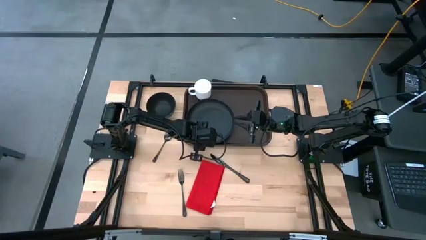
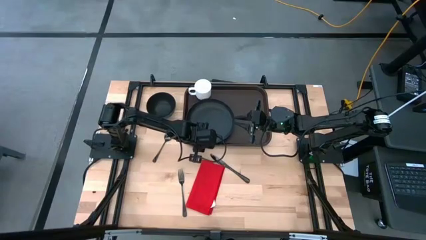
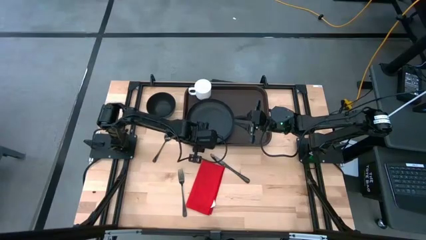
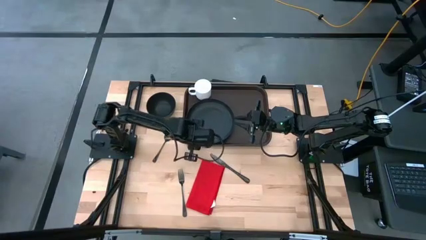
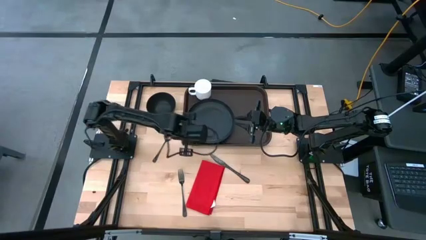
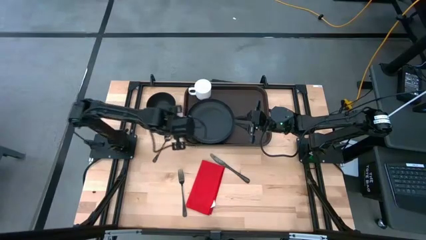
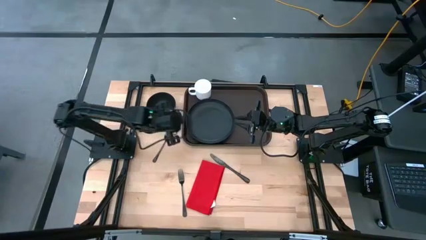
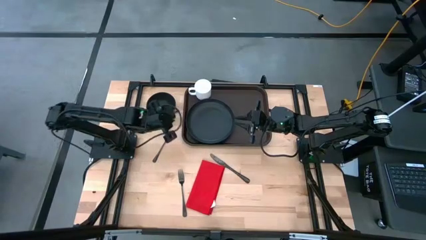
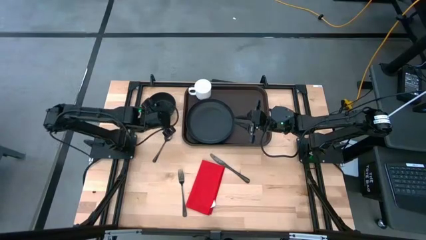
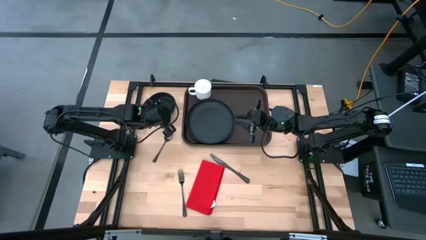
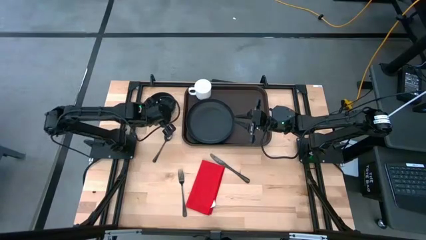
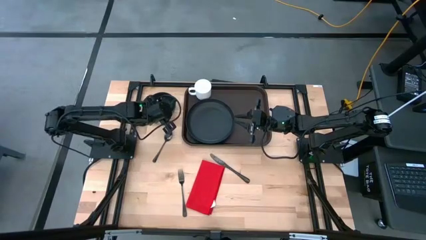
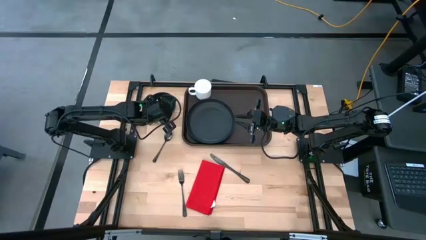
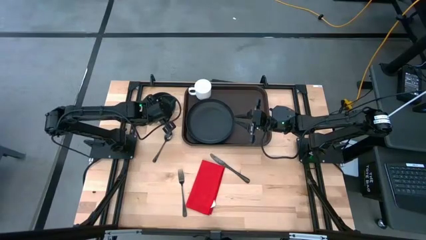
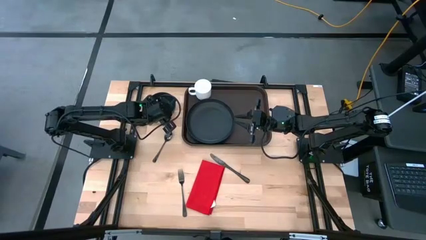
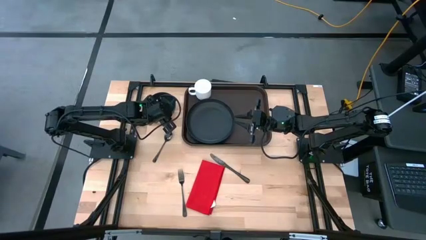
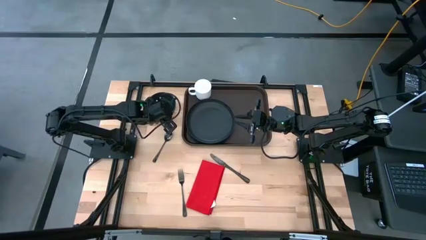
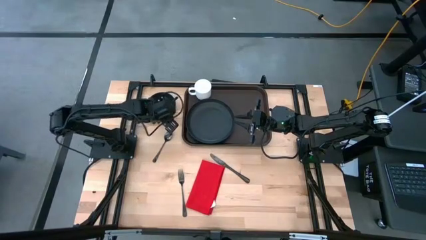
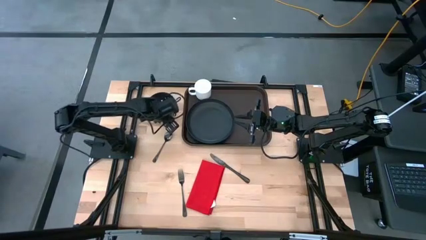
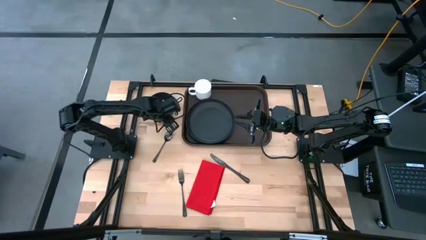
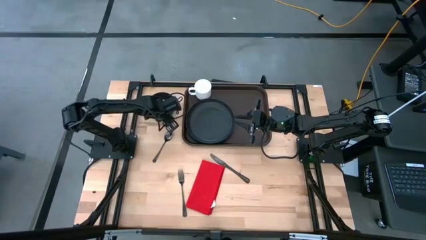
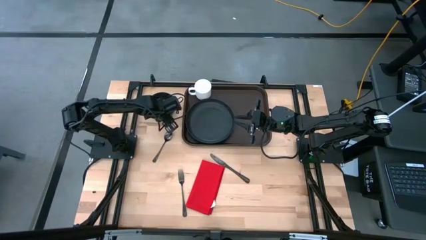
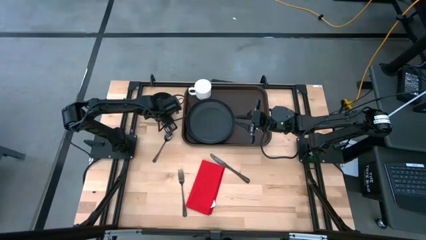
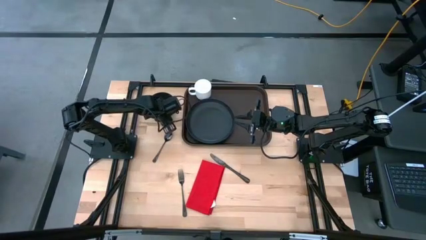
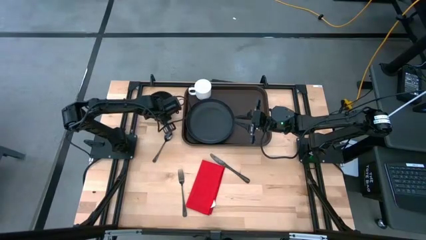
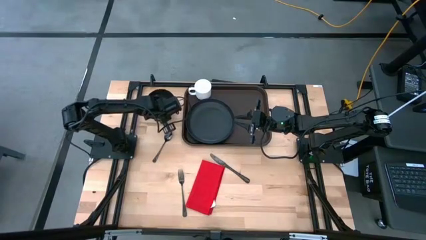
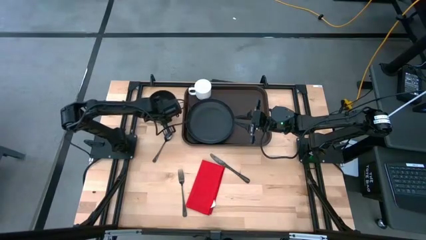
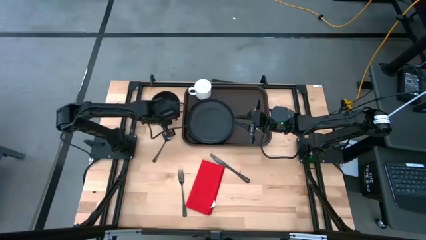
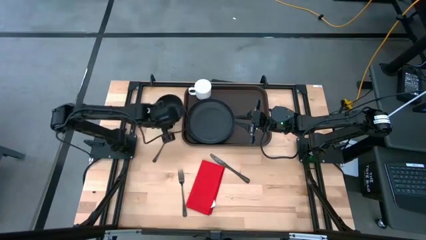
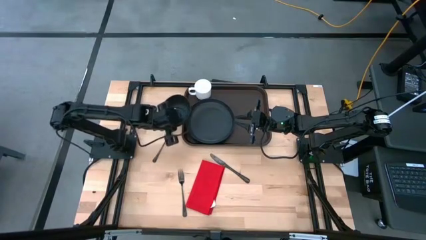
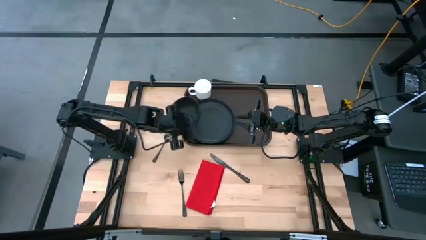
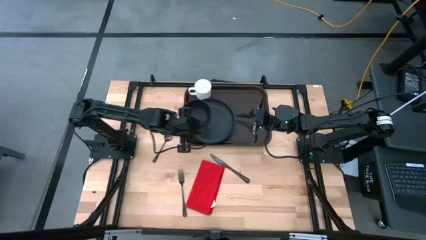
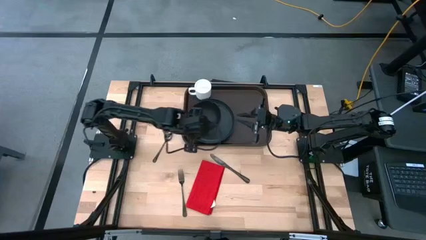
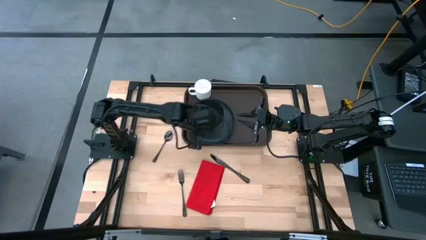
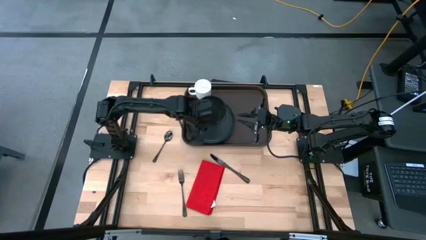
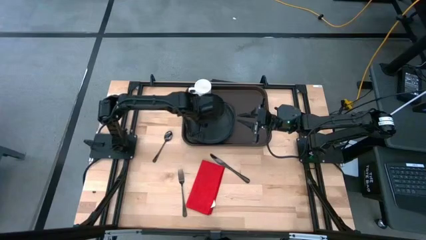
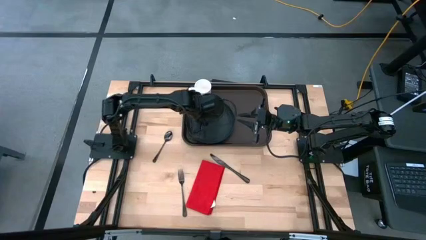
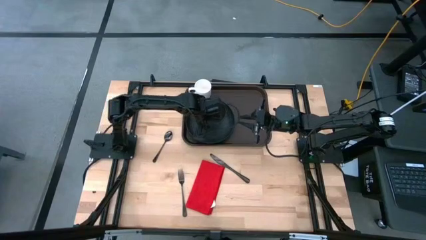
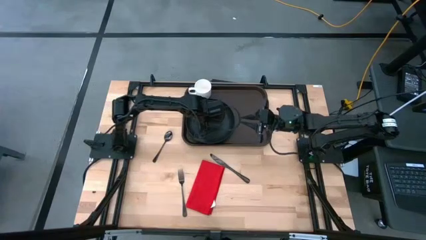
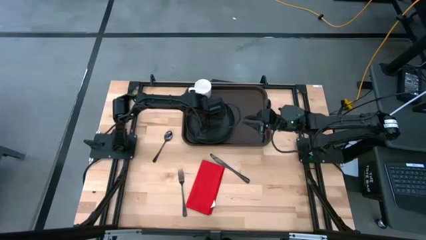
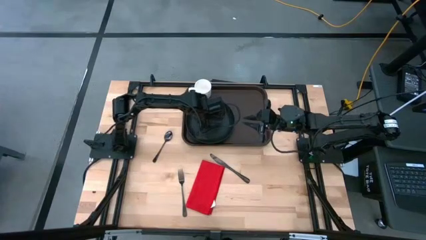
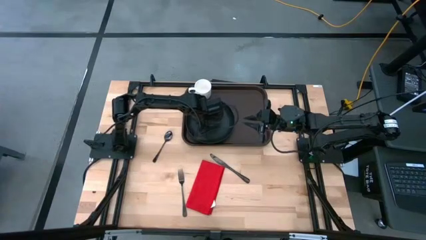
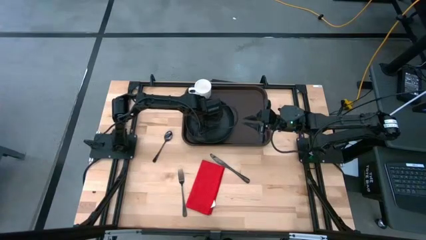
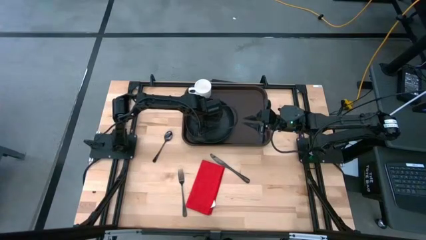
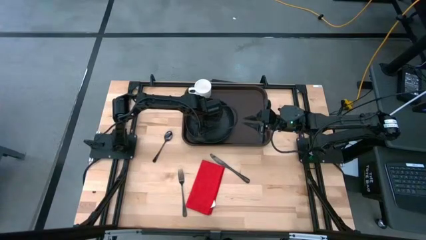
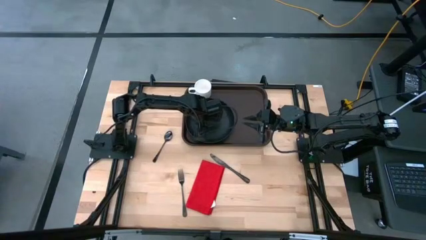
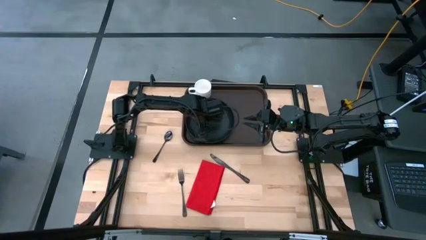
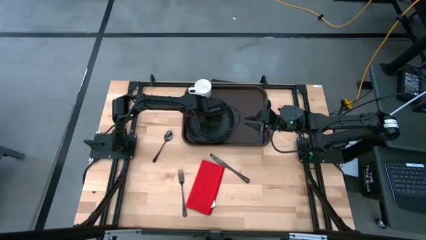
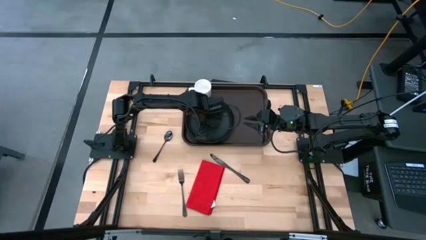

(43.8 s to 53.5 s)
Task: Set up tray
Put the black bowl on the black plate on the brown serving tray
